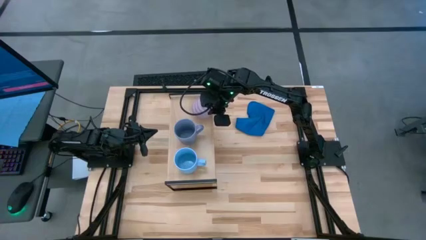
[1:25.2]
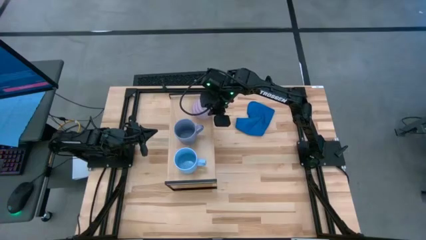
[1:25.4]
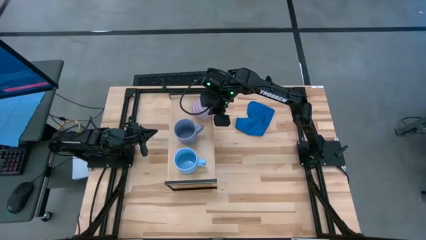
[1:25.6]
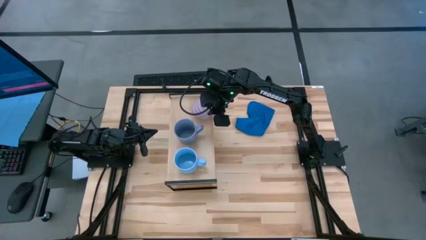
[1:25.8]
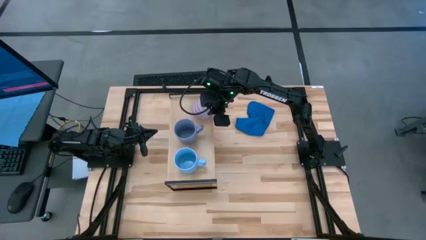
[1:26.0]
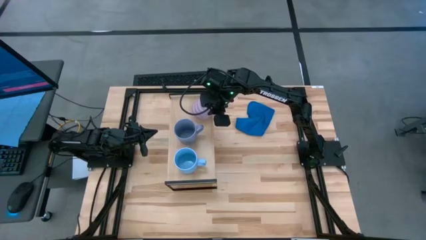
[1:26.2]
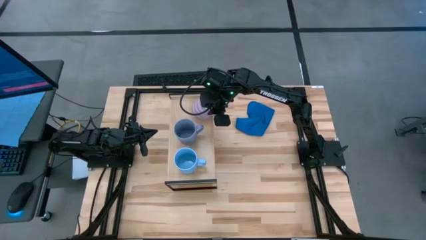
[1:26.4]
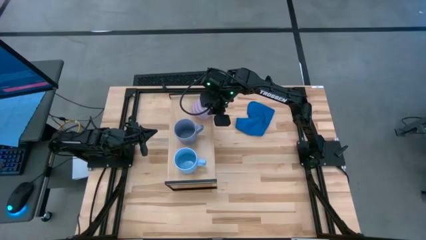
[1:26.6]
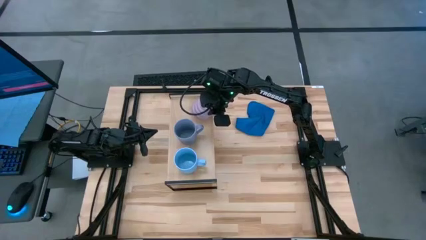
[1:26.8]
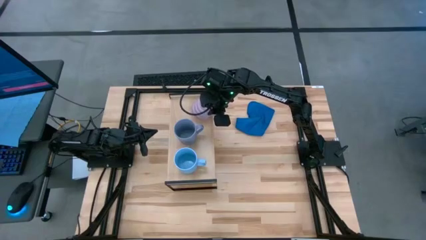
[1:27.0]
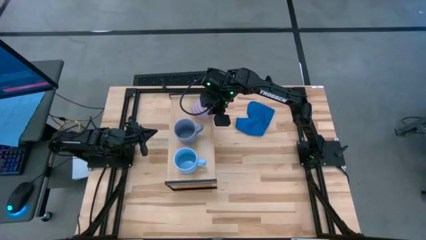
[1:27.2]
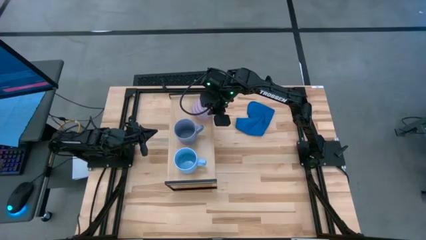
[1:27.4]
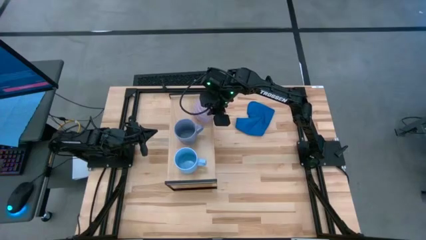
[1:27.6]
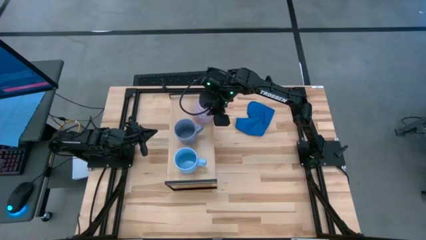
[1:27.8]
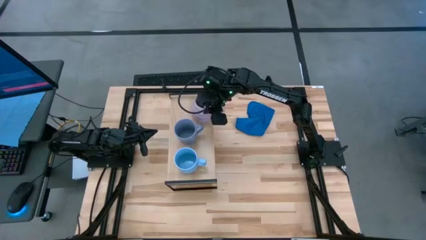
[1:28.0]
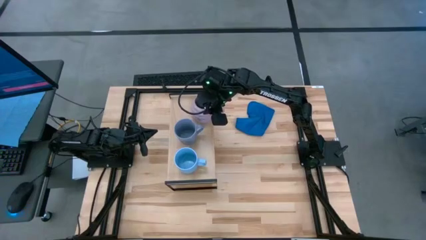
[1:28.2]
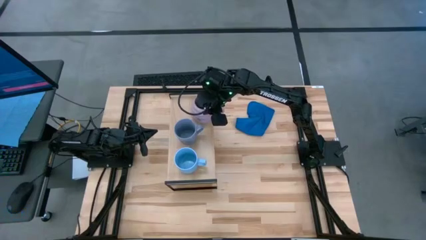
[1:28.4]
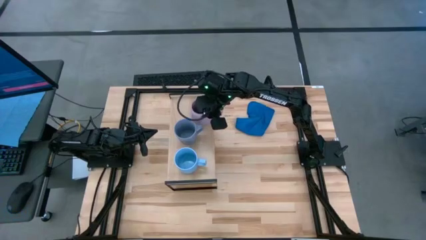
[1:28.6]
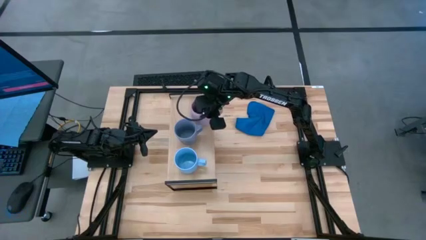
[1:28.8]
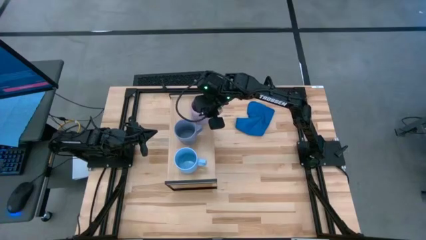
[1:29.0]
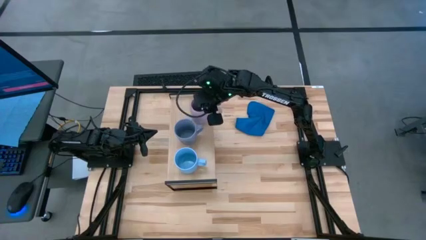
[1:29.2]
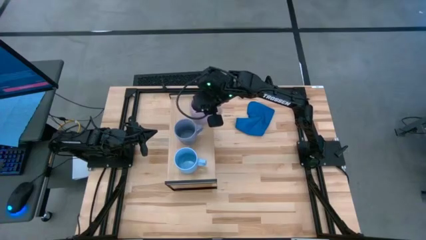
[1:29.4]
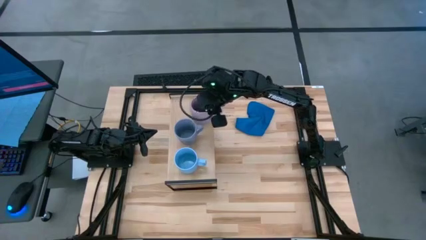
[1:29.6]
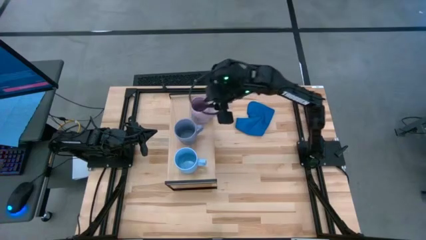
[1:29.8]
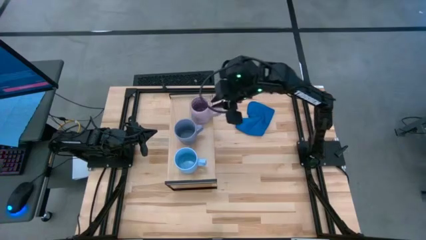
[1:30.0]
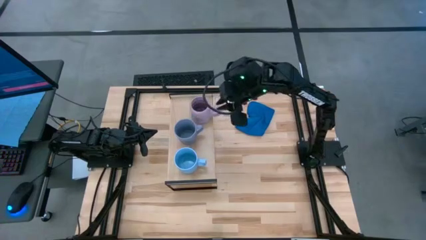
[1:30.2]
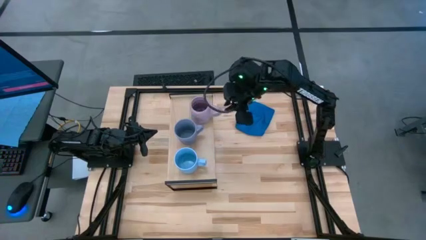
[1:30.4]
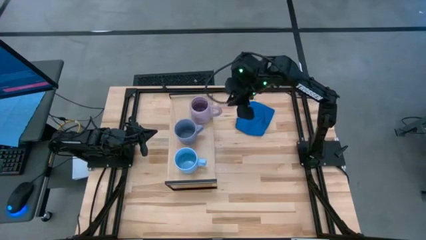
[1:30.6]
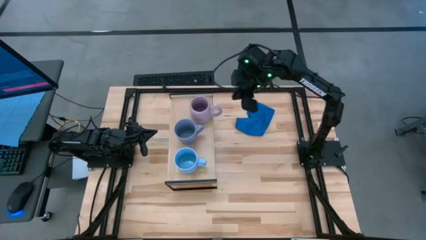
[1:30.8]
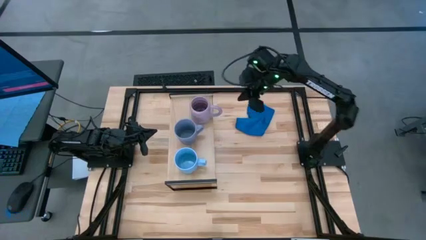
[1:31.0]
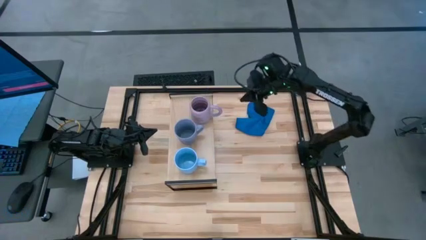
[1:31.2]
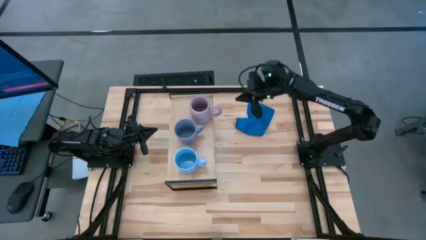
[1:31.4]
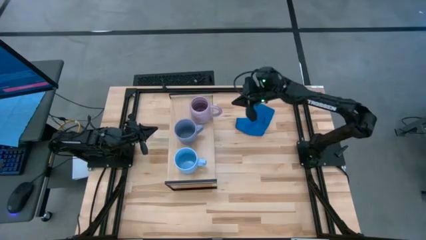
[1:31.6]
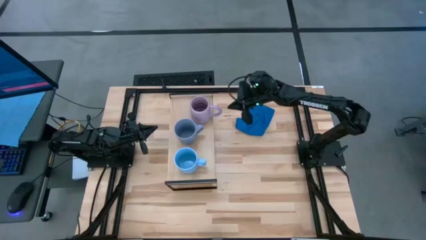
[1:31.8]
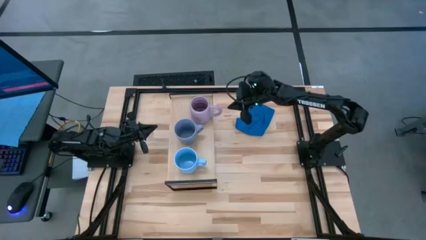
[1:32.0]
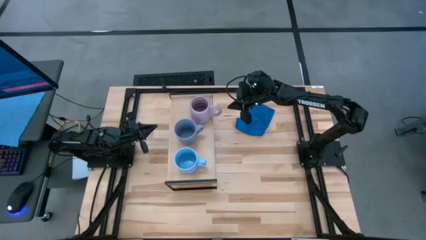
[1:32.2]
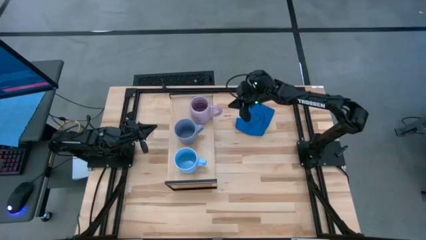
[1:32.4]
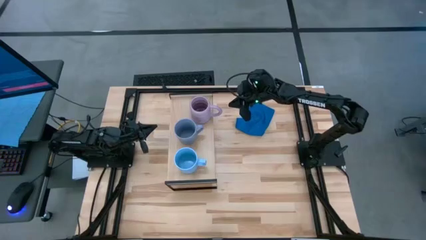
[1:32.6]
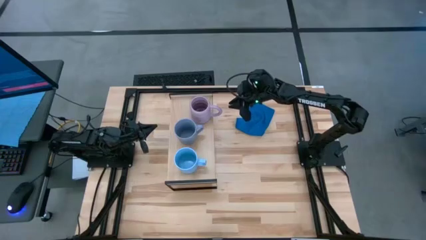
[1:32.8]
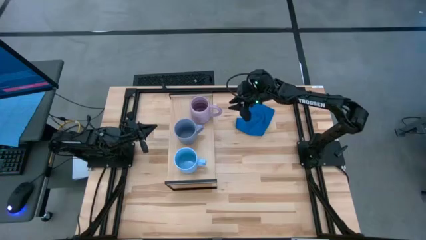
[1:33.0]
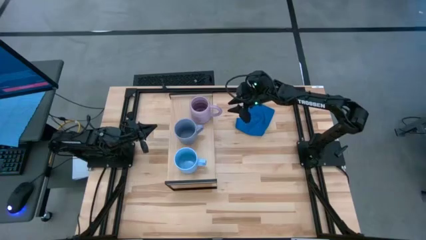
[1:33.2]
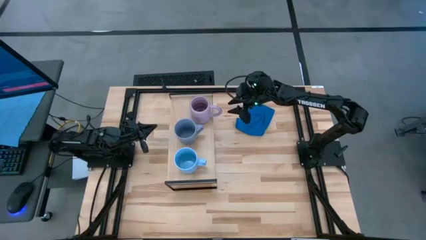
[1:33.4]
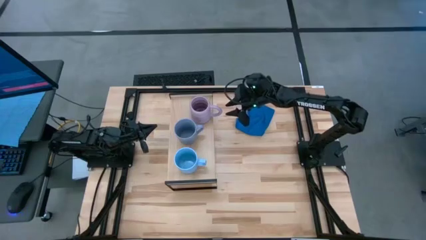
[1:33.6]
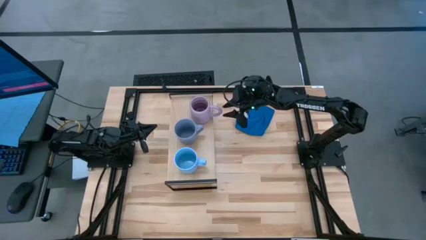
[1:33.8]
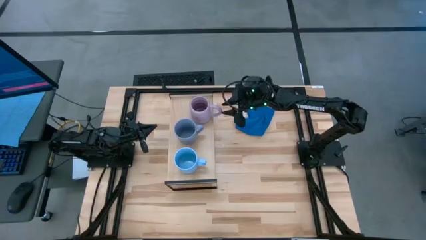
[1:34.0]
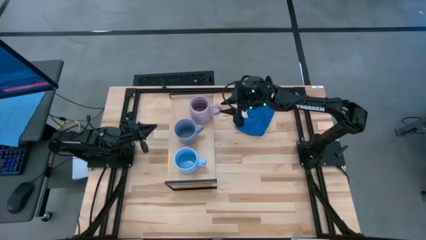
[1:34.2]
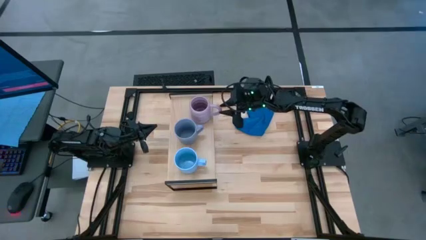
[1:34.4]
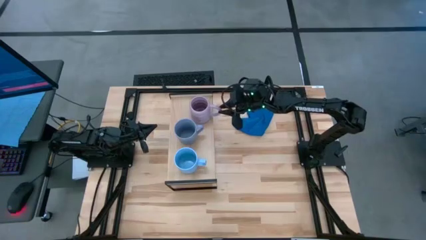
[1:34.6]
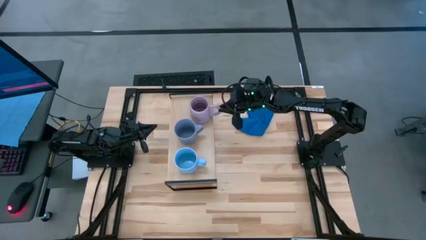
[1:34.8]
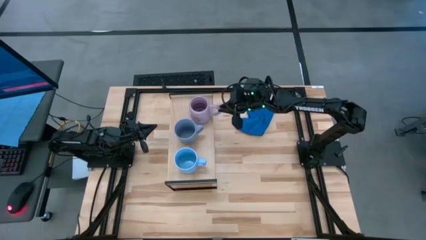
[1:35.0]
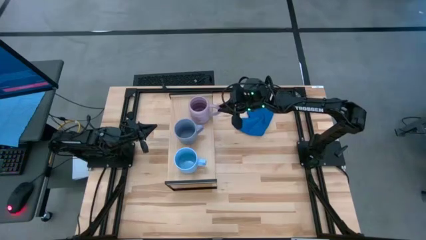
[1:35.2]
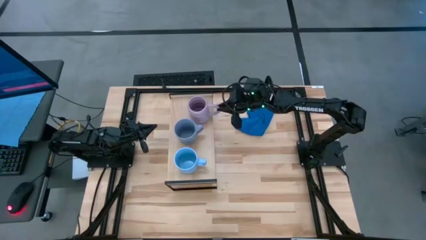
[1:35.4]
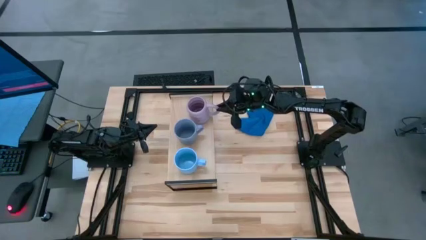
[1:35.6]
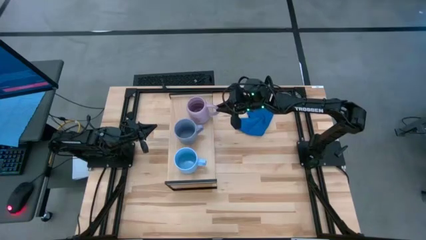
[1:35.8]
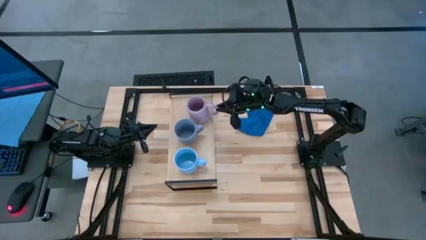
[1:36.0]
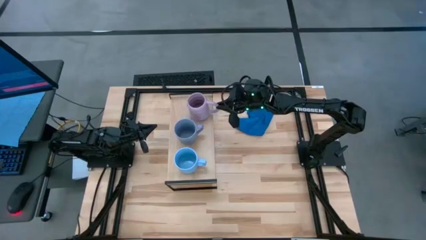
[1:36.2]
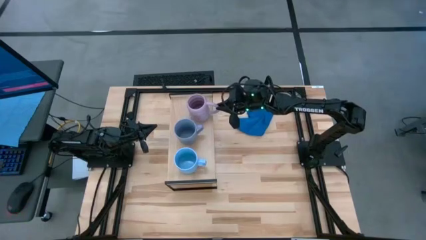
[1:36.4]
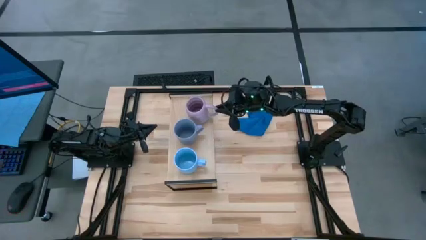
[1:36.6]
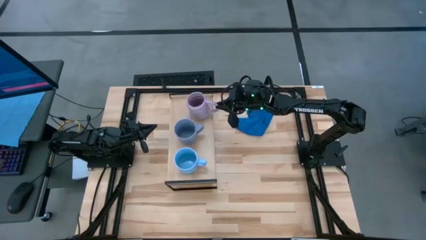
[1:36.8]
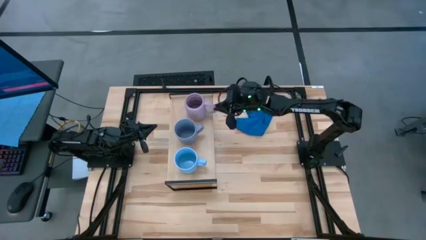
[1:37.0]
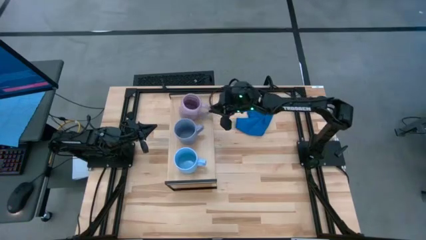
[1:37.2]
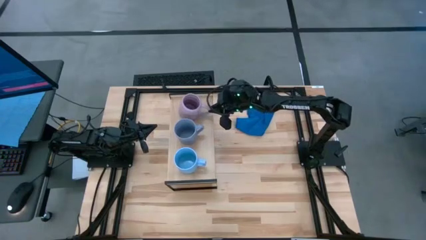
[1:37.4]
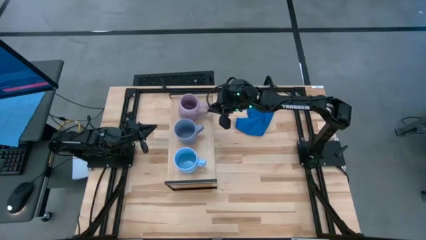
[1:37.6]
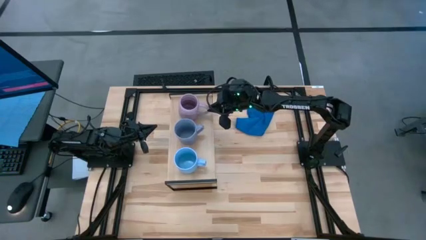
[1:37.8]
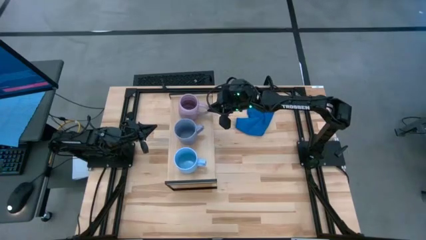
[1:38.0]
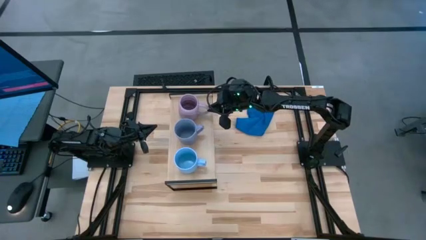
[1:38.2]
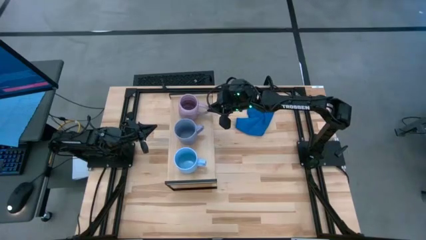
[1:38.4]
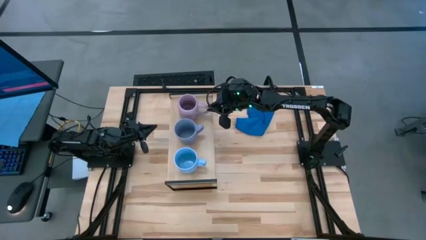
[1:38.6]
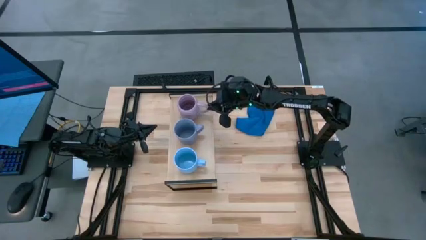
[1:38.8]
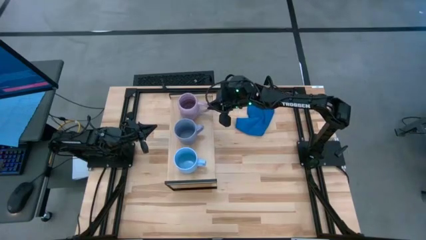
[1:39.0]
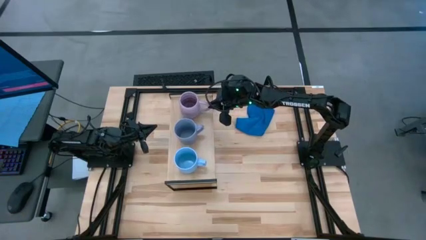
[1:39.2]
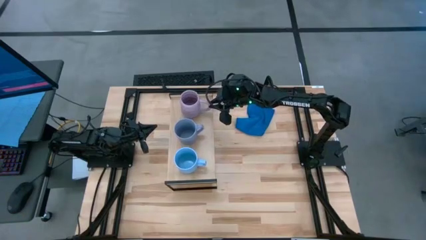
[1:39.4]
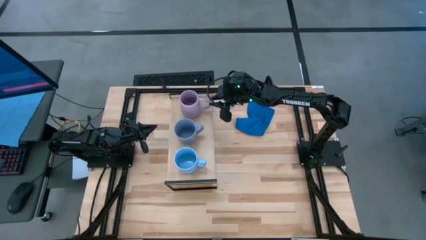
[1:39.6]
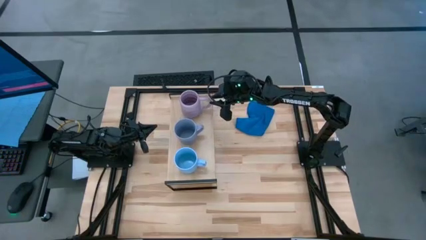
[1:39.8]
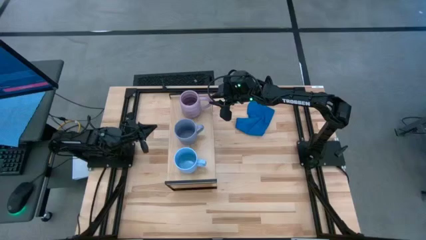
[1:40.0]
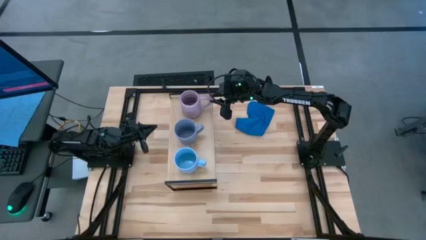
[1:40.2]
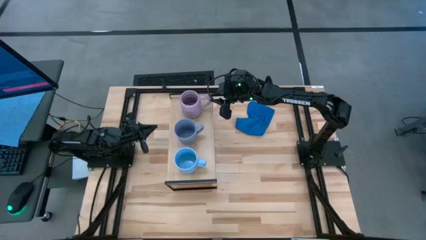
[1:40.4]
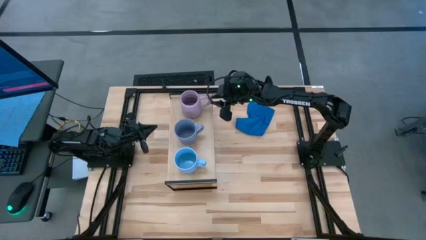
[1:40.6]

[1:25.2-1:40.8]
Task: Stack small to large cups/mugs on shelf
Put the light purple mug on the shelf
